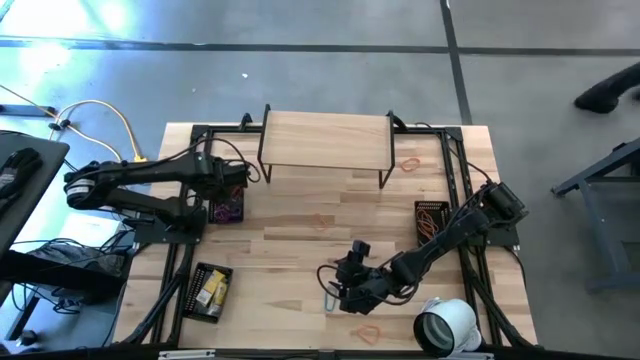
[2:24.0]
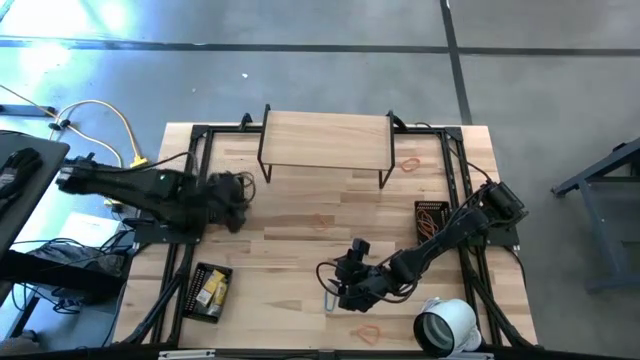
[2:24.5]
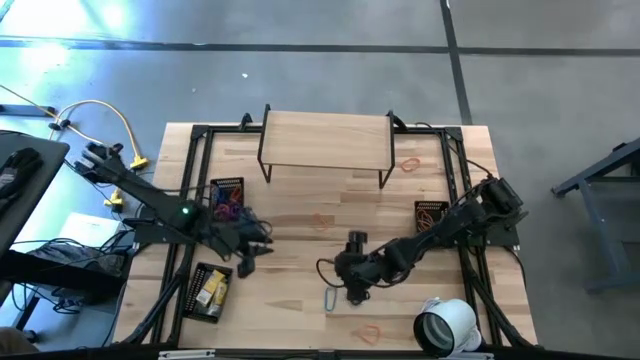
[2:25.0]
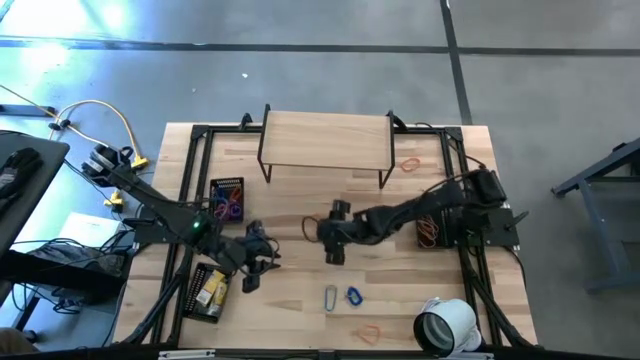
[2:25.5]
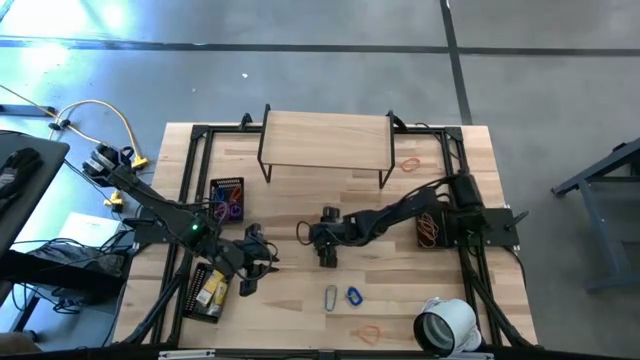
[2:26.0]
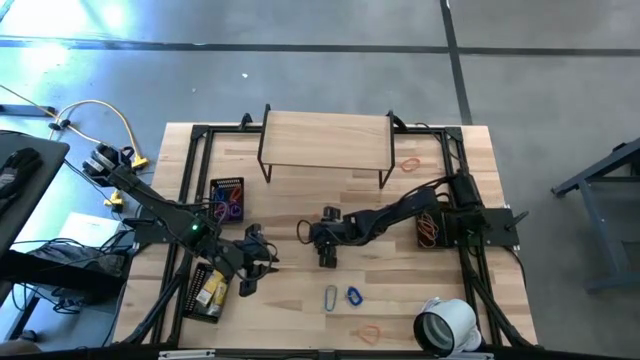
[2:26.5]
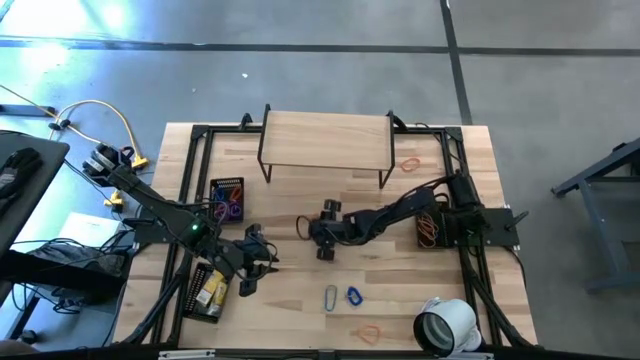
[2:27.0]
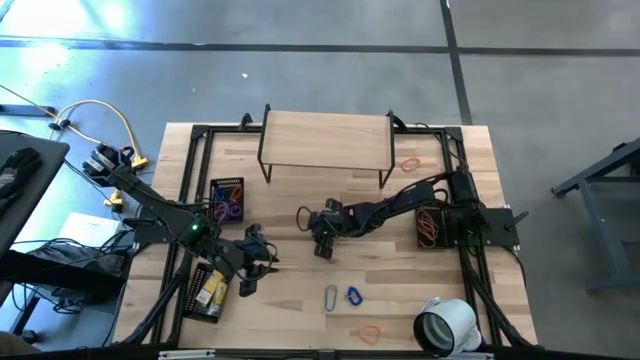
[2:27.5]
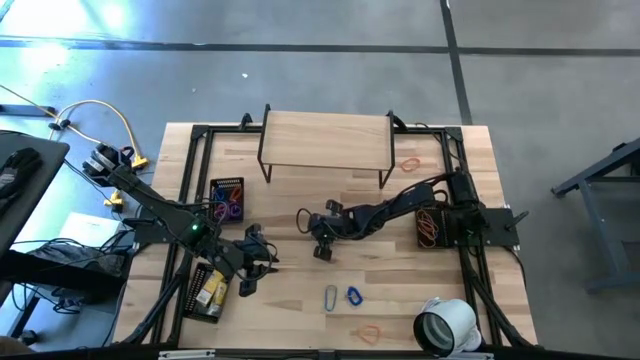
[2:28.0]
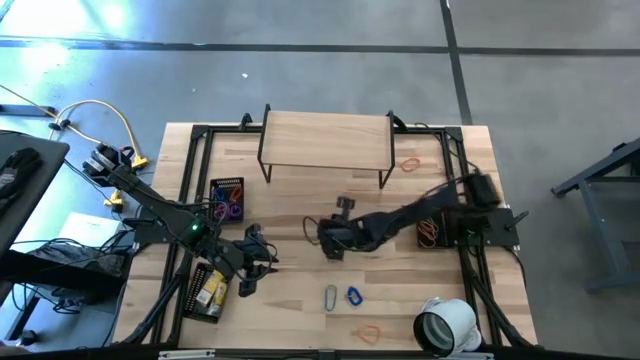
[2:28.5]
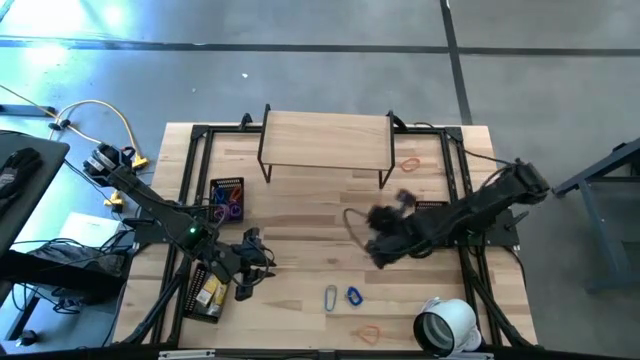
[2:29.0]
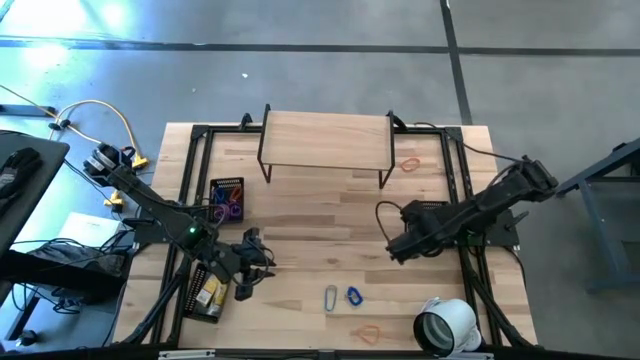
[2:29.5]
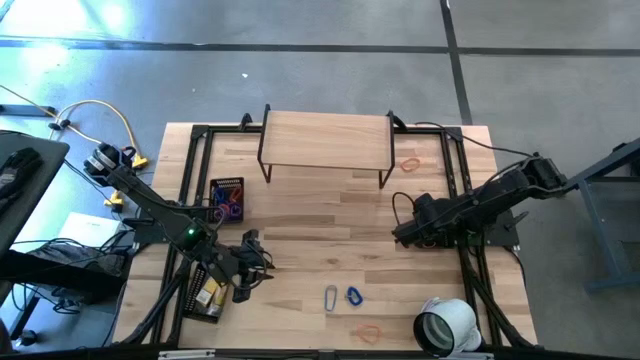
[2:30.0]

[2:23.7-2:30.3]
Task: Pick & Place Office Desk Supplies
Put the orange rubber band into the top right black bin

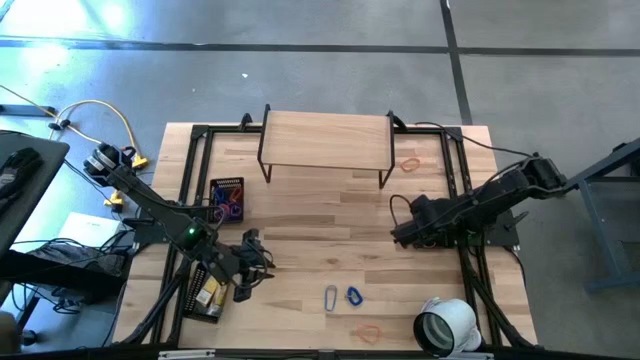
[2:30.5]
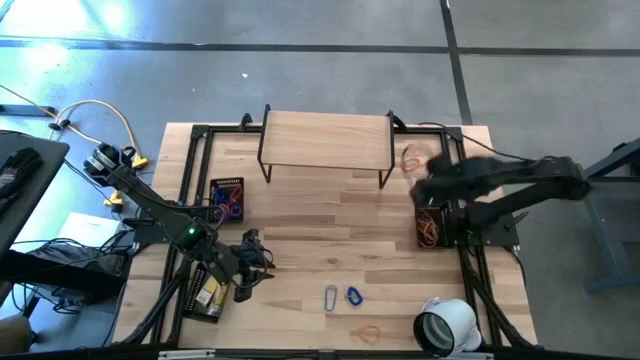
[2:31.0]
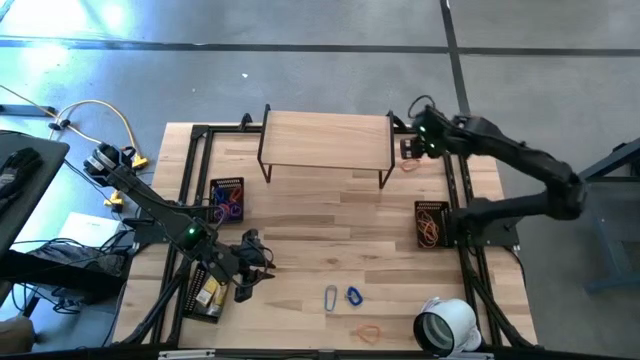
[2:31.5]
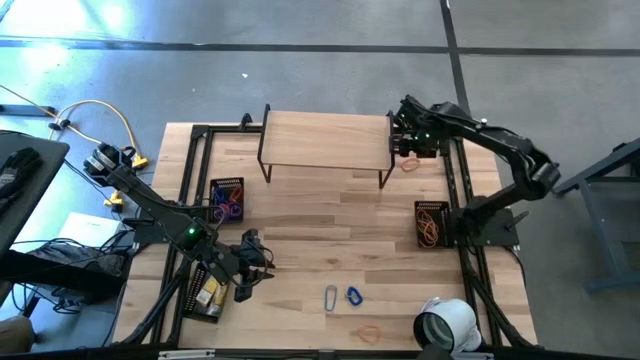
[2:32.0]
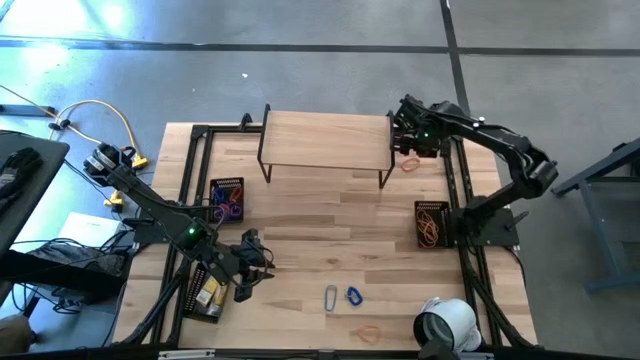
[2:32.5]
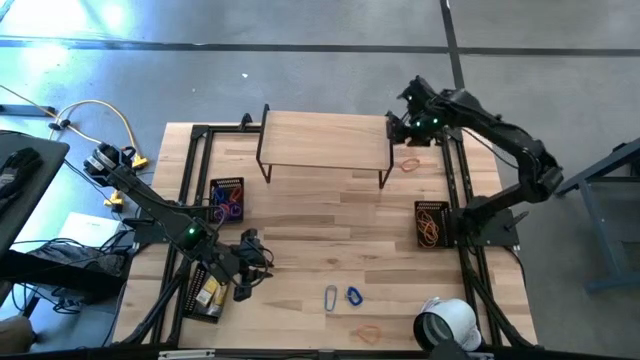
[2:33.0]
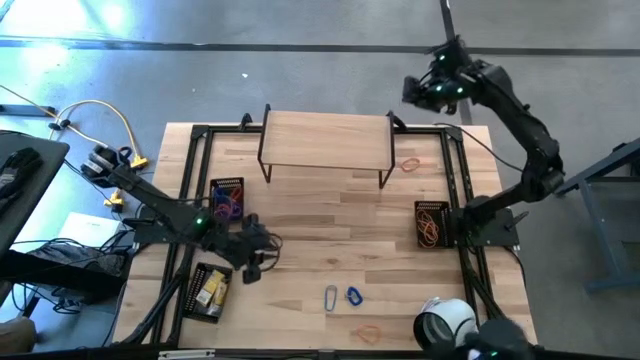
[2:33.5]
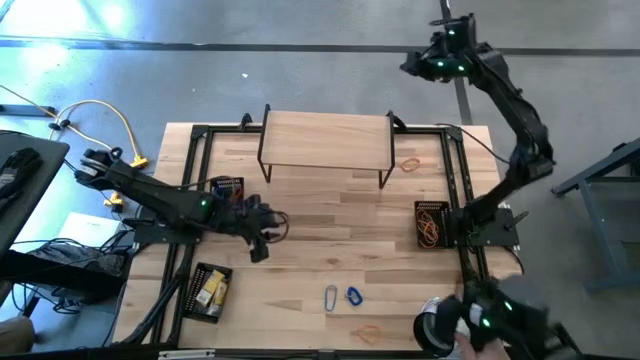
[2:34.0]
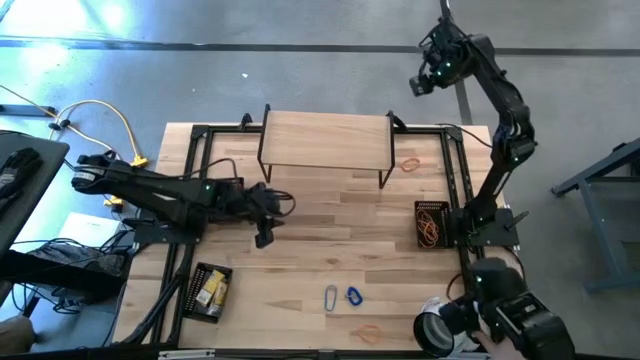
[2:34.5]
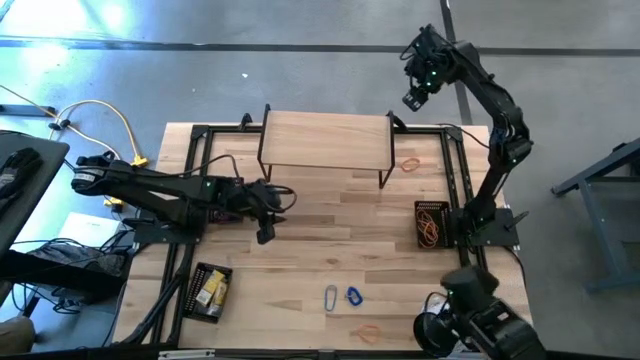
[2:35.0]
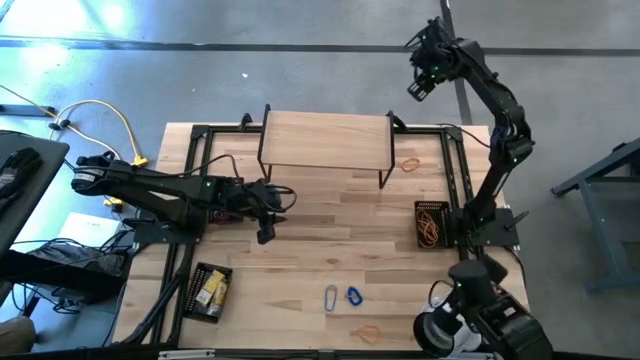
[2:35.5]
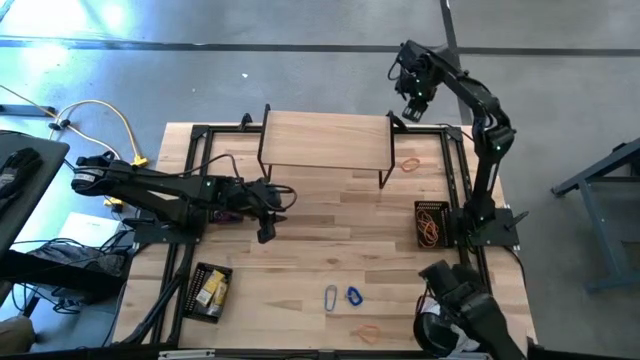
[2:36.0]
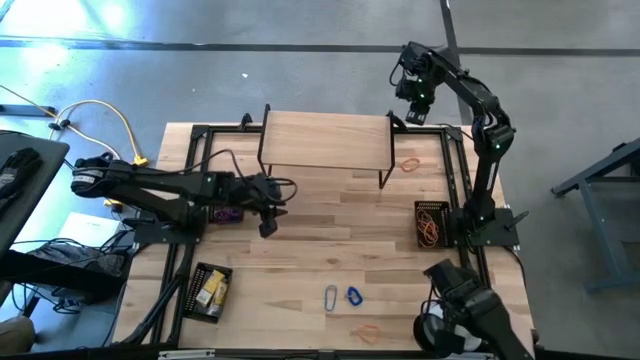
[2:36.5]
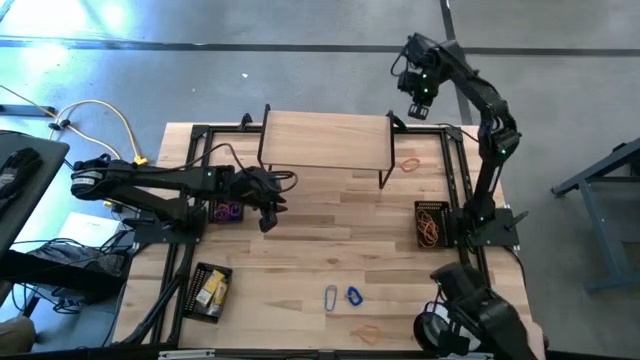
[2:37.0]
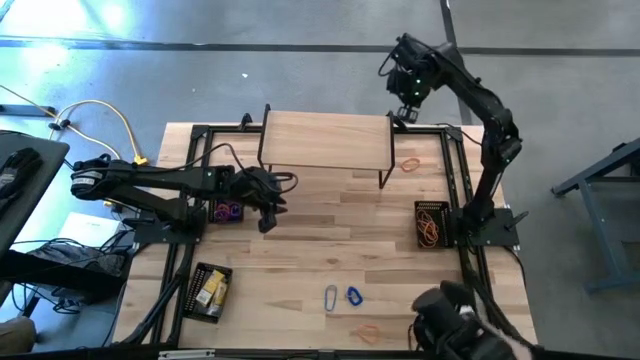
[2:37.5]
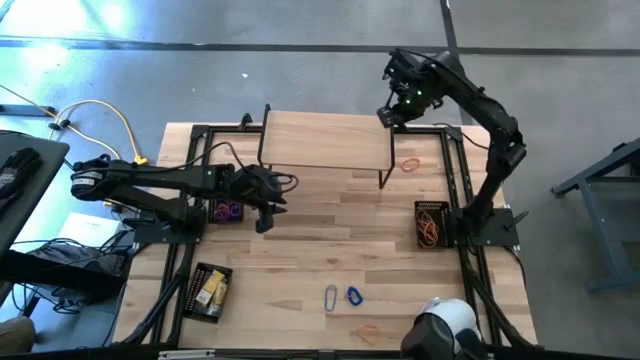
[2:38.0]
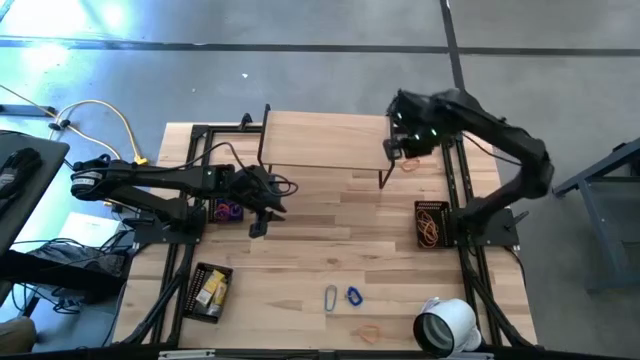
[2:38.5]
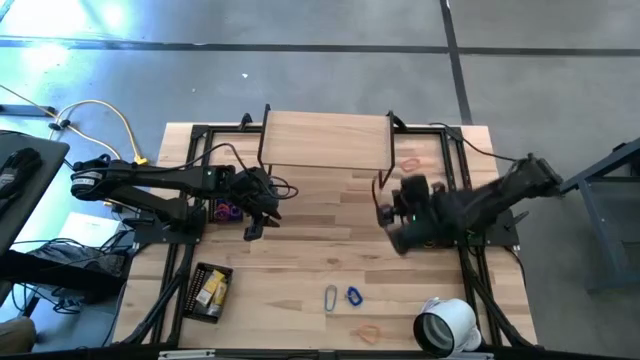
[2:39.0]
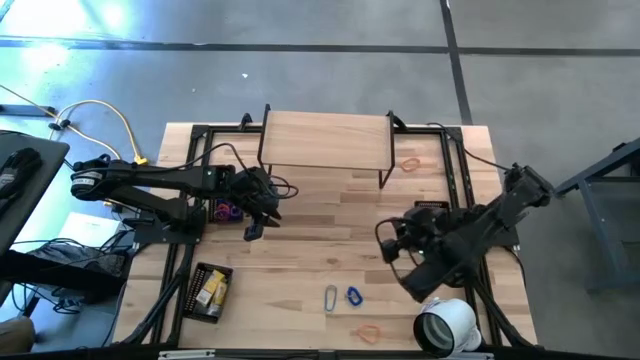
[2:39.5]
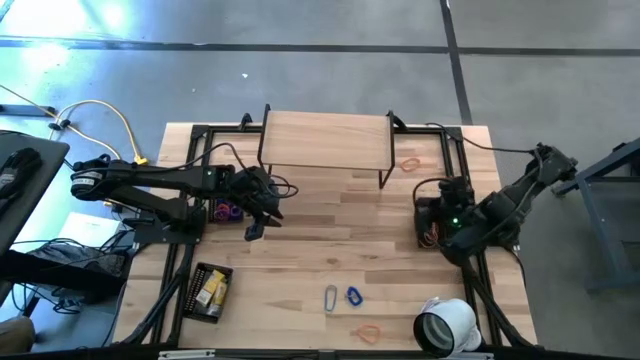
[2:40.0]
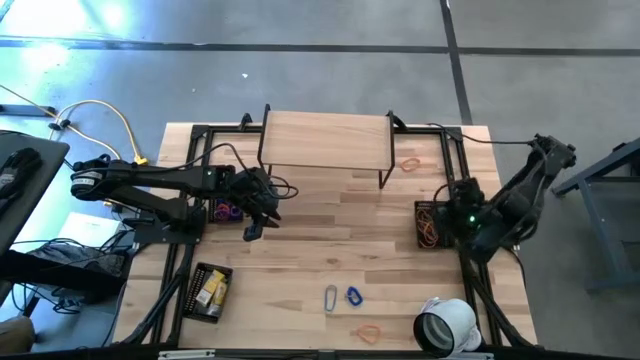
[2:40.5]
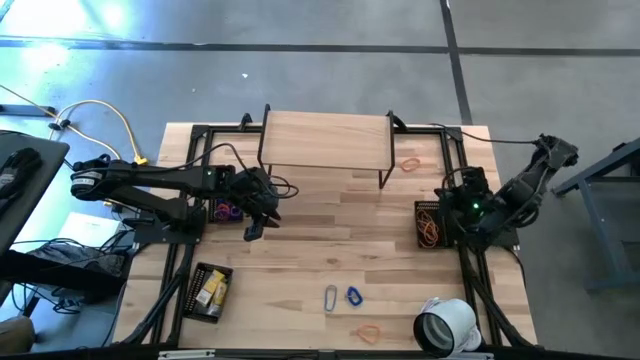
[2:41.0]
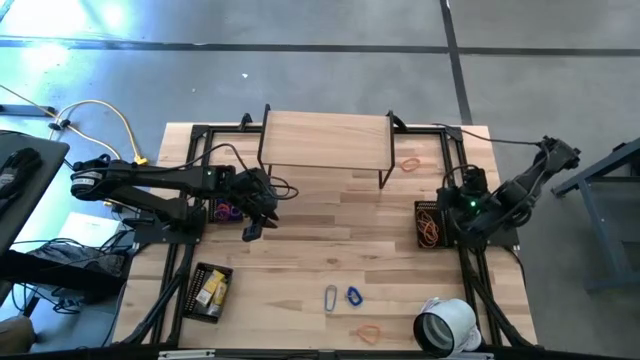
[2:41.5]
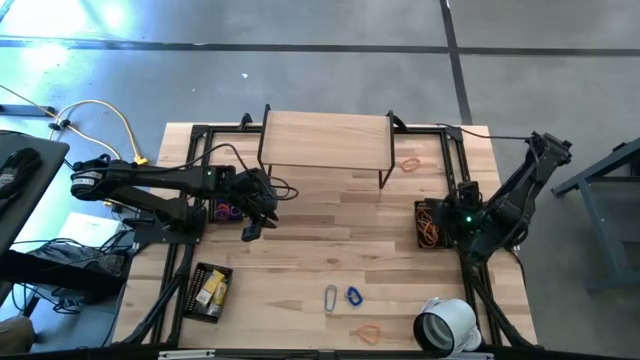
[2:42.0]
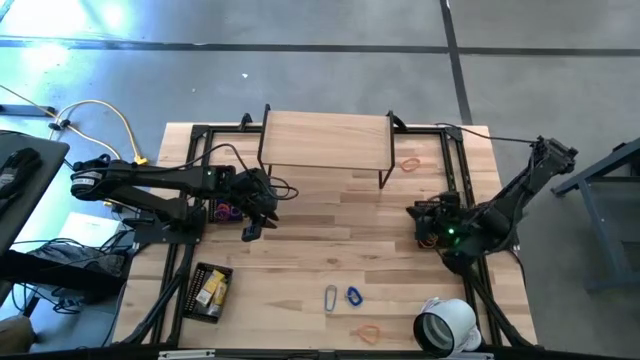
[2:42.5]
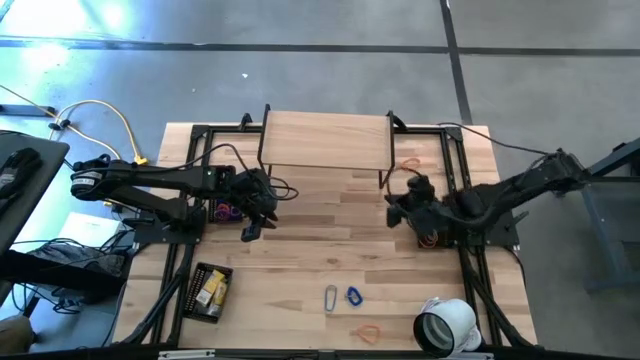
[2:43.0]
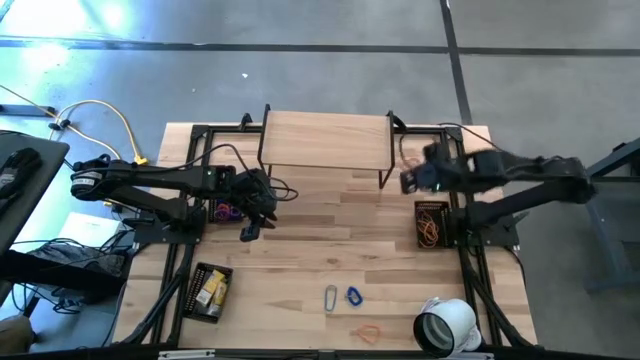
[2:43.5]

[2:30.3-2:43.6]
Put the orange rubber band into the top right black bin

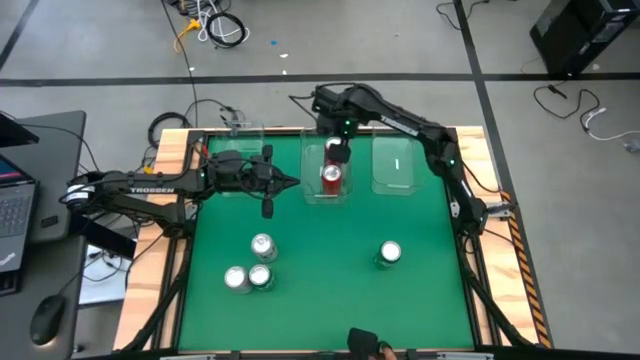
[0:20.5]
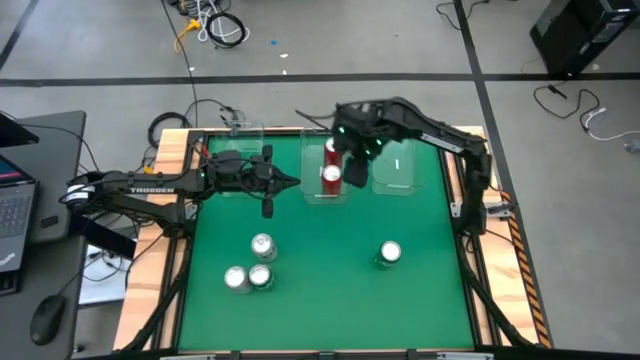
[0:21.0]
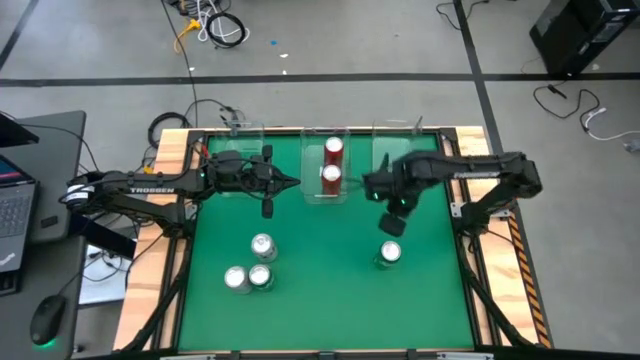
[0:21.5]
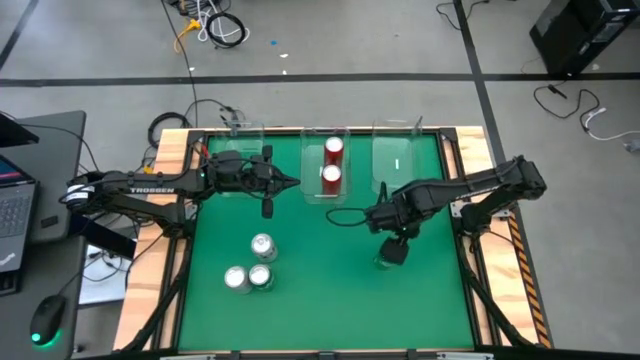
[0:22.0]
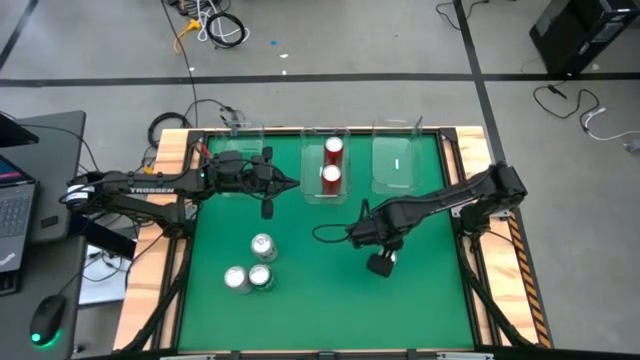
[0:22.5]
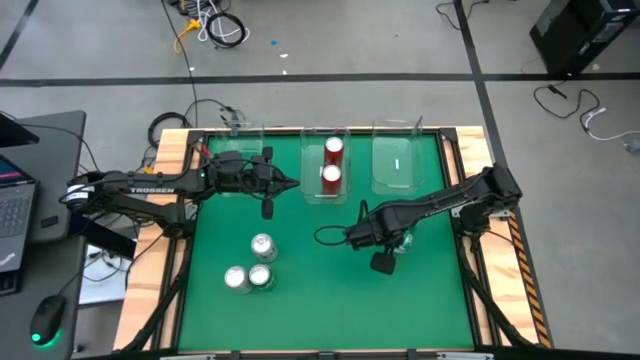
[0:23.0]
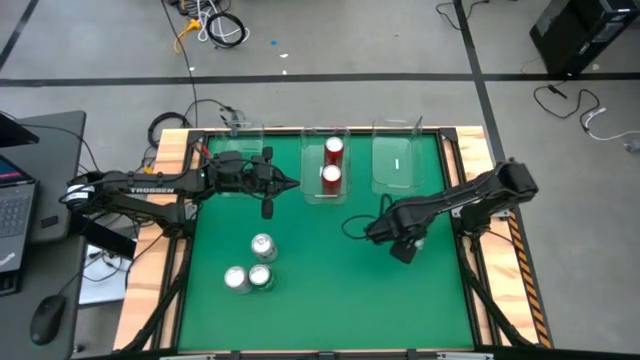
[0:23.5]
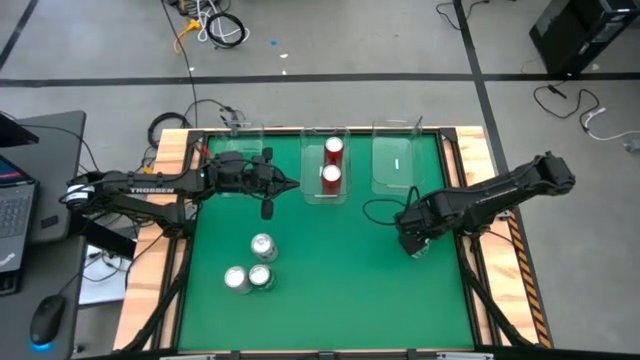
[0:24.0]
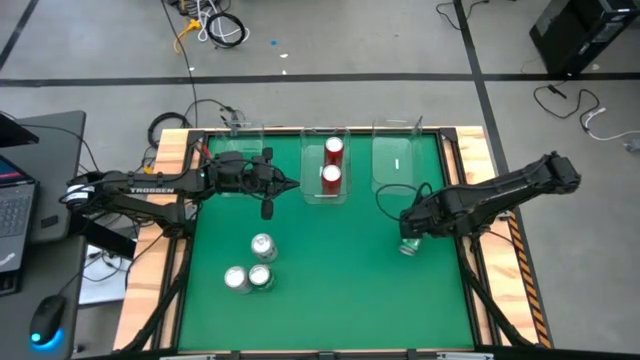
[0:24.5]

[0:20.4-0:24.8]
Task: Sort soda cans
Put the right green soda can into the right transparent bin
